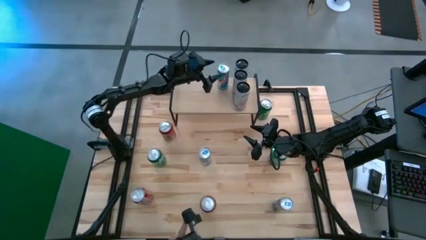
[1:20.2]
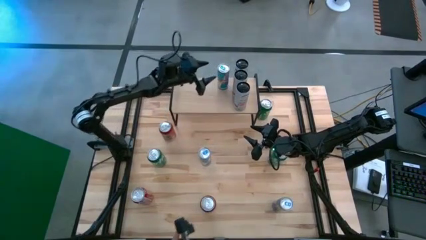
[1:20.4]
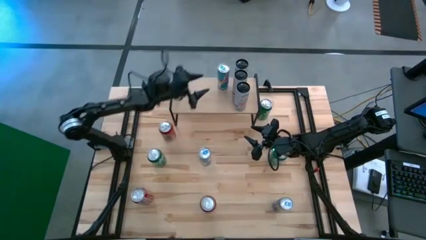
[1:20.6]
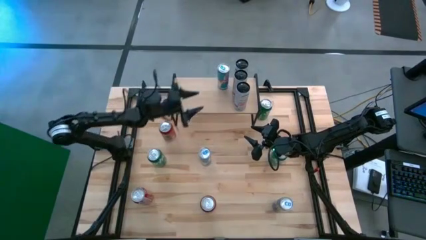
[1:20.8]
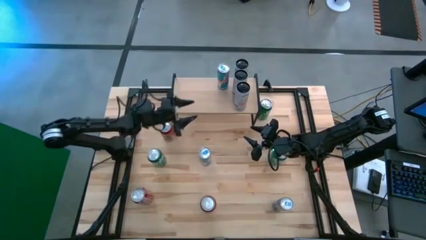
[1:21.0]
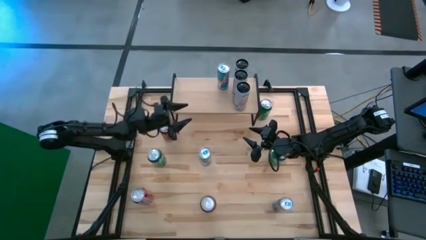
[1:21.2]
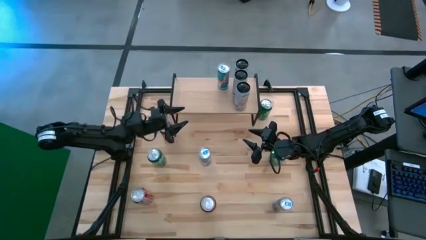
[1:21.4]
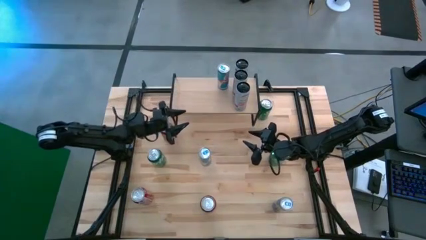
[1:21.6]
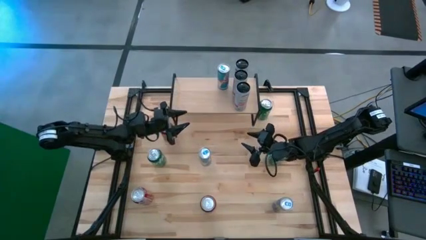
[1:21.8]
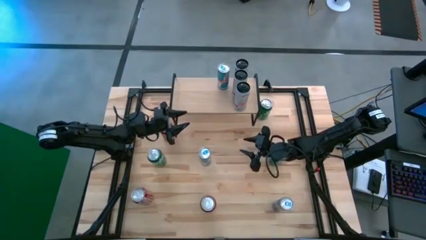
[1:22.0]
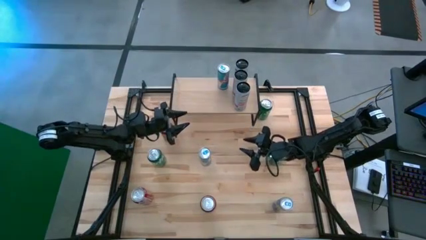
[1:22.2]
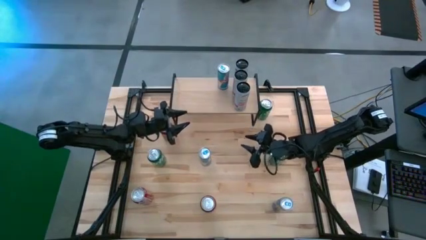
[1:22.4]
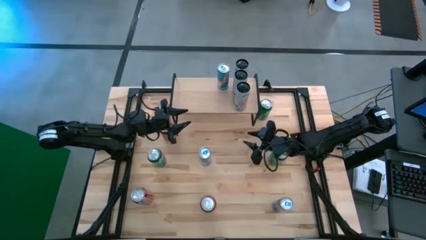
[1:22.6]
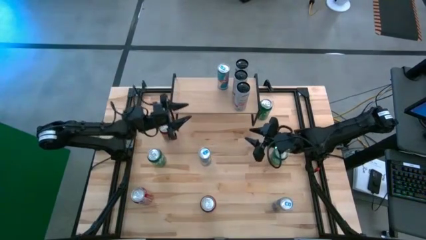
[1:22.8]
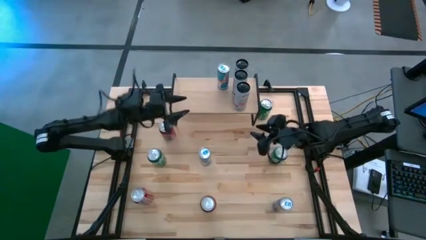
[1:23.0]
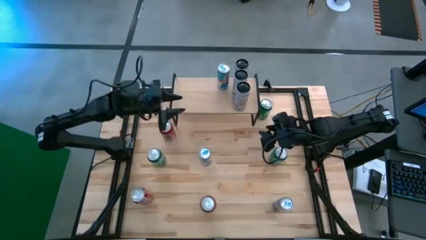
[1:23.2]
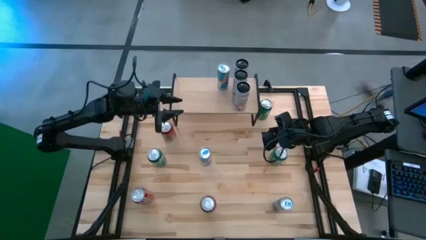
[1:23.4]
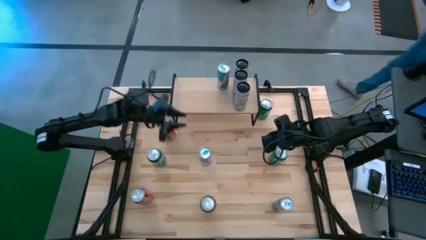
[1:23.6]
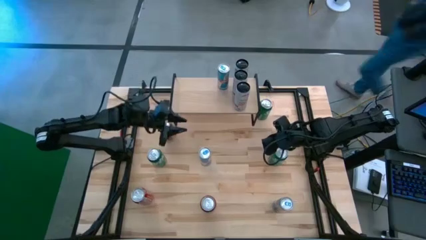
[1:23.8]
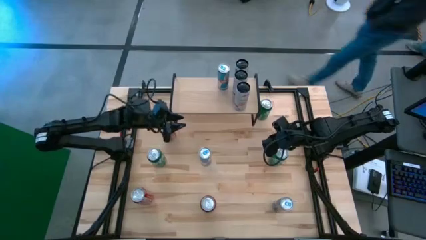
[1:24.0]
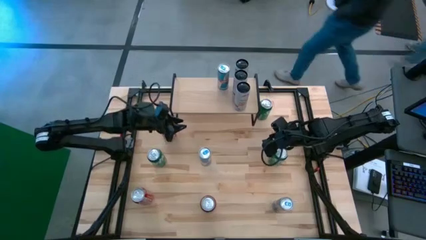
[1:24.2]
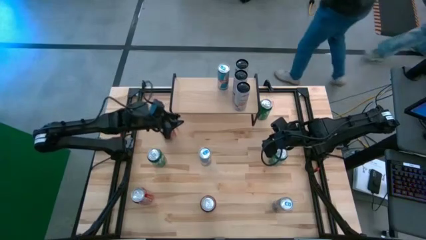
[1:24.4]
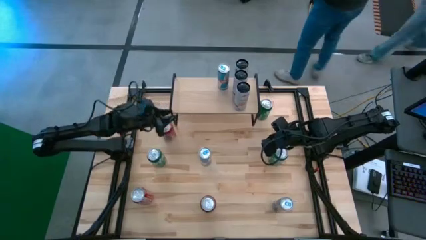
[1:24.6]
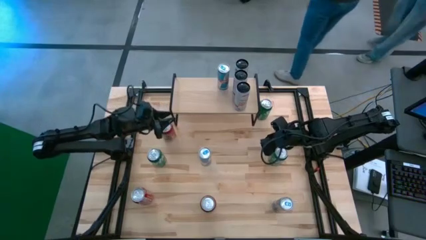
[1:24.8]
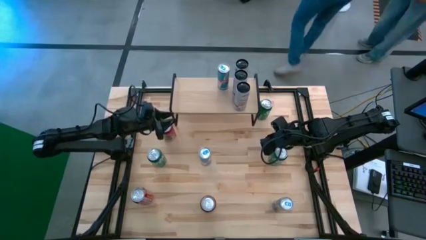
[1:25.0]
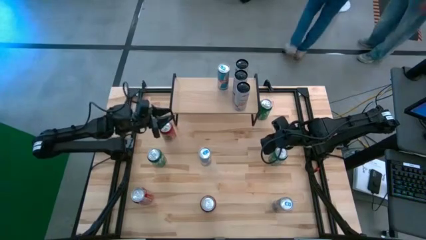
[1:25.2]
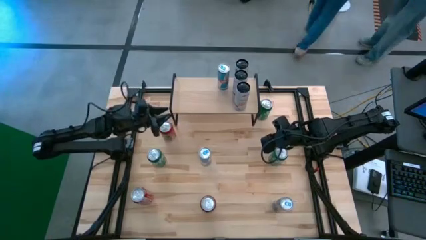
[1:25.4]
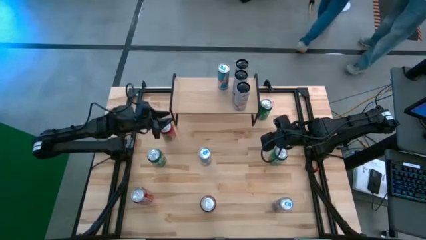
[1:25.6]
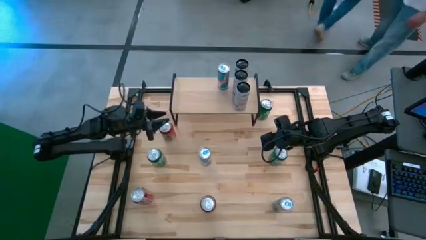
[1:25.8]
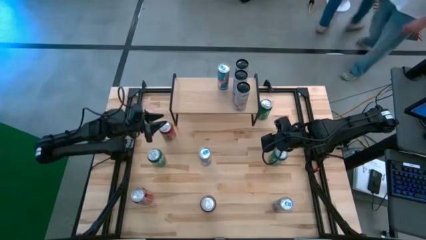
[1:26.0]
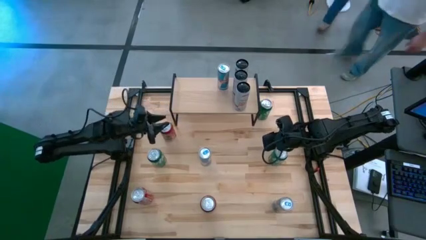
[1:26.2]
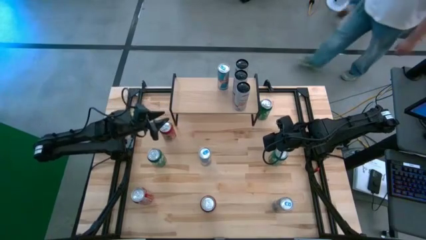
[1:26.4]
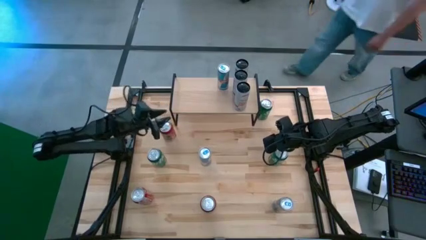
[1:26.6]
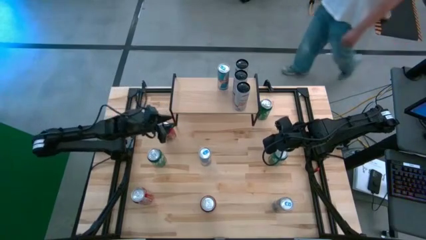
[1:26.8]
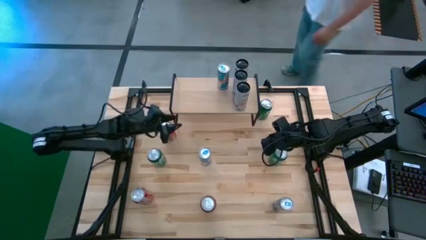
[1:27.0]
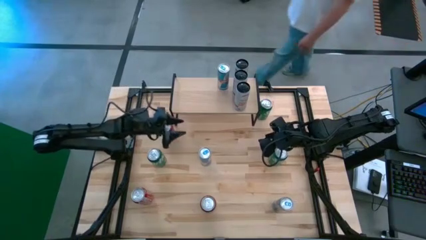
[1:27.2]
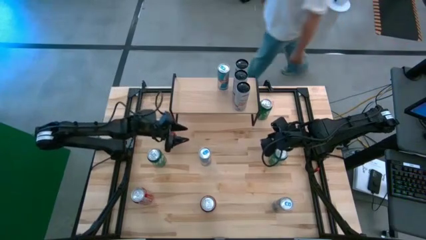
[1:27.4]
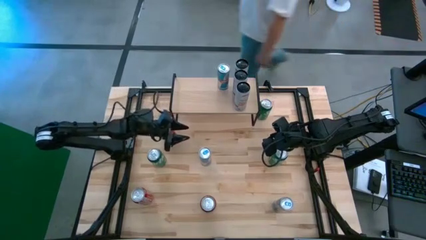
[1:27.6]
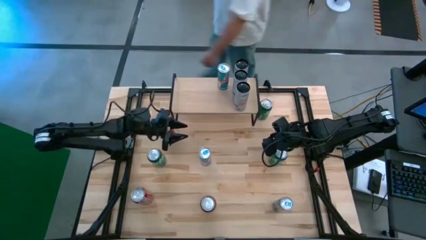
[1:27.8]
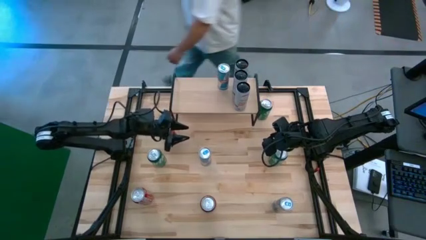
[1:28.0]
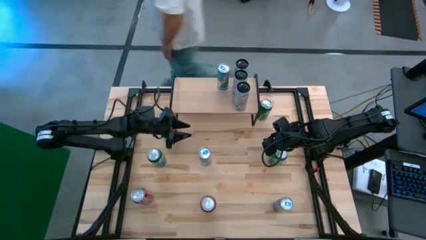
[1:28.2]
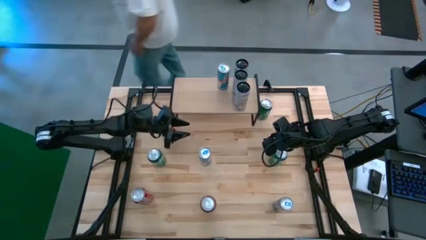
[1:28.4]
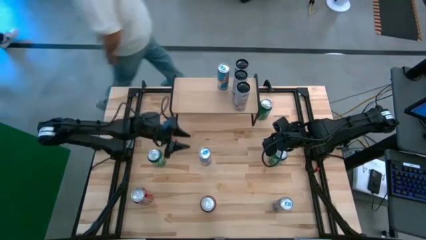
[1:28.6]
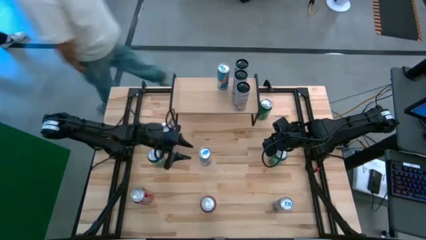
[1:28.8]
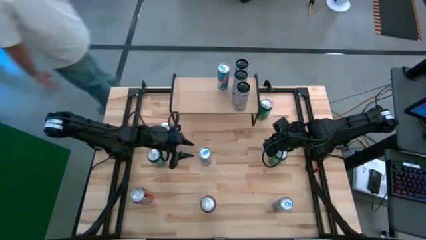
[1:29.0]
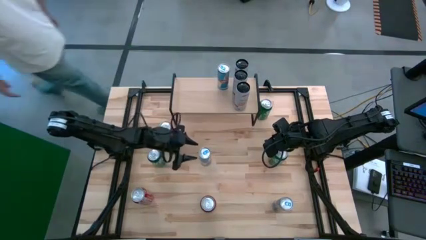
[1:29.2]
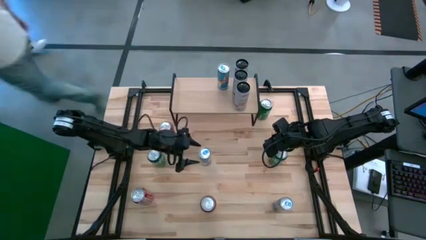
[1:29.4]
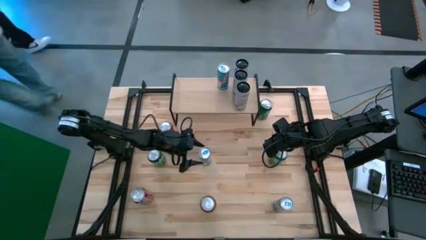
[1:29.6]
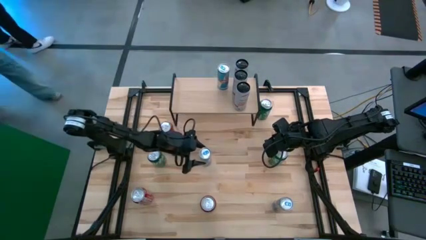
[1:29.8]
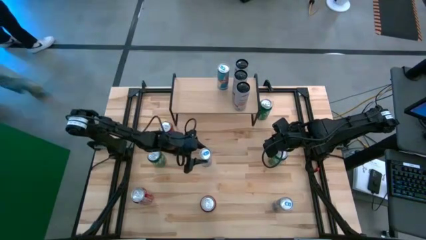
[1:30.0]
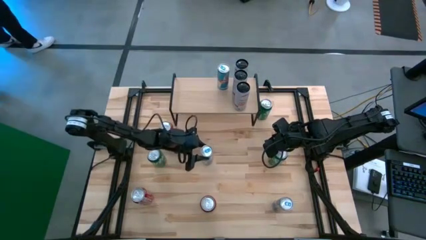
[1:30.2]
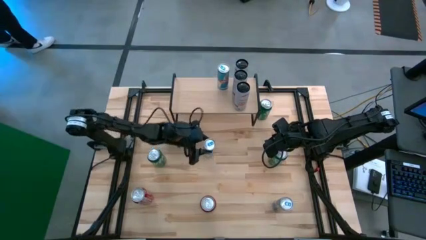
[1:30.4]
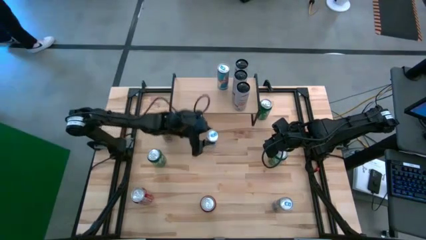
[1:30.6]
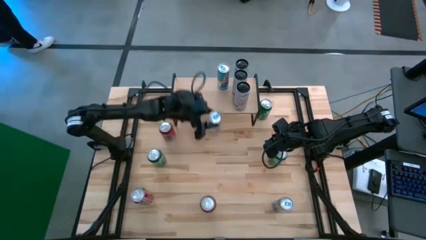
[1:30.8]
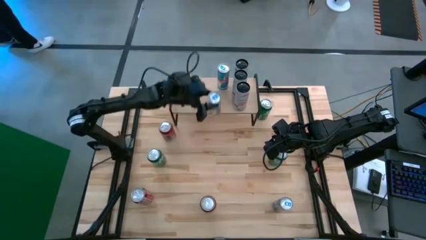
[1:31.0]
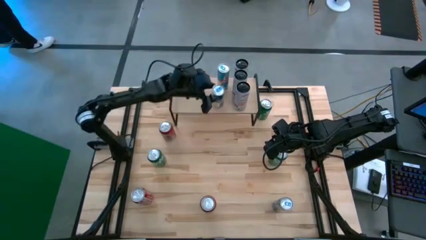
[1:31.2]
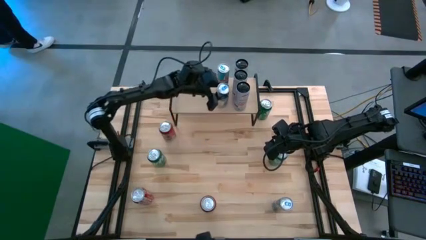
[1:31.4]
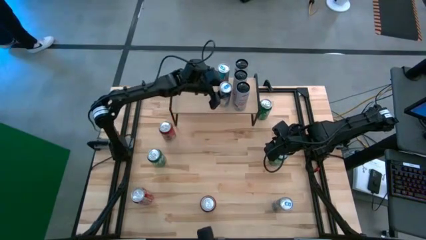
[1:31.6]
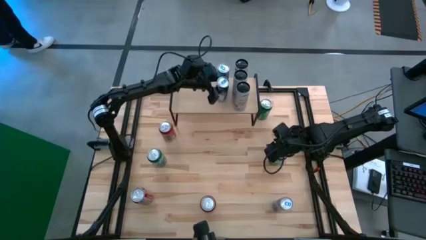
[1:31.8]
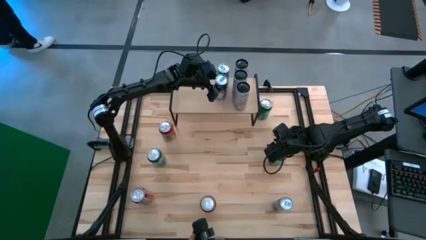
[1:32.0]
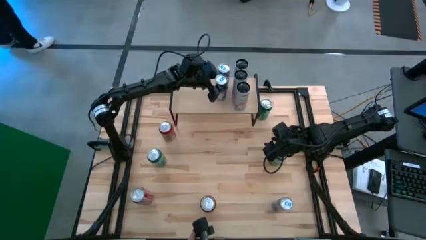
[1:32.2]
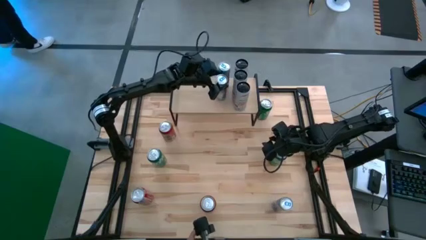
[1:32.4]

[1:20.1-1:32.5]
Task: Place canned beverage on shelf
Put the top blue soda can on the shelf aligned with the other blue soda can
